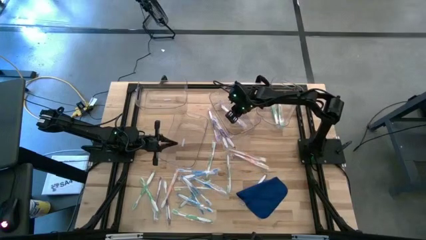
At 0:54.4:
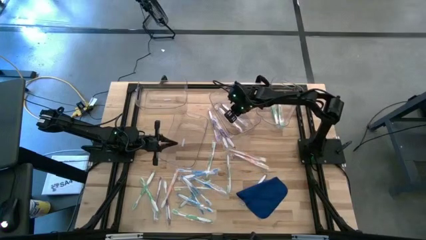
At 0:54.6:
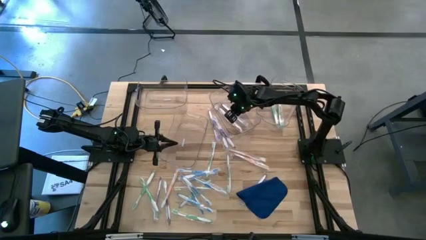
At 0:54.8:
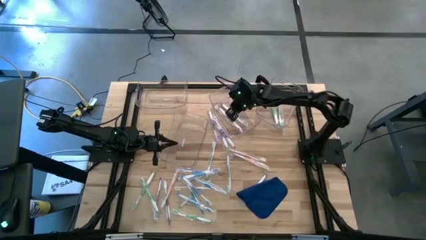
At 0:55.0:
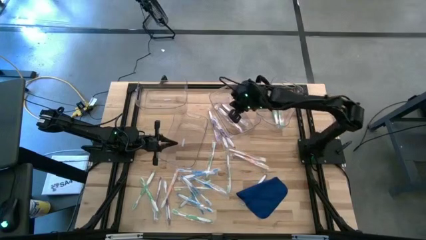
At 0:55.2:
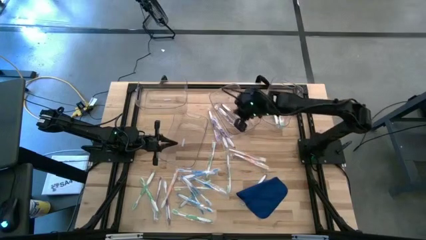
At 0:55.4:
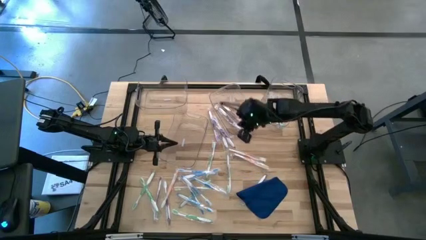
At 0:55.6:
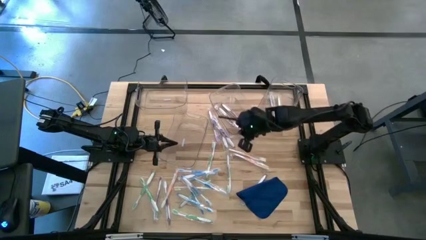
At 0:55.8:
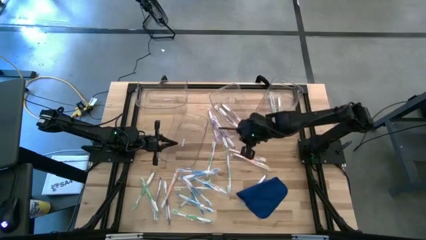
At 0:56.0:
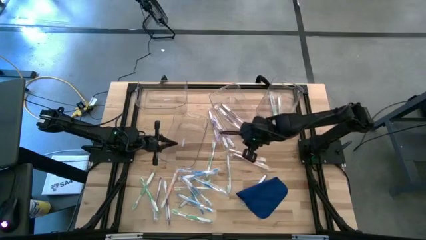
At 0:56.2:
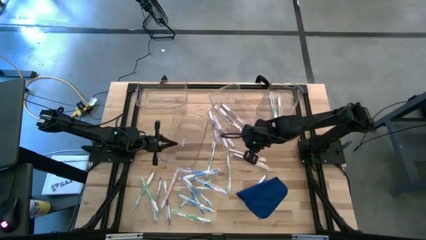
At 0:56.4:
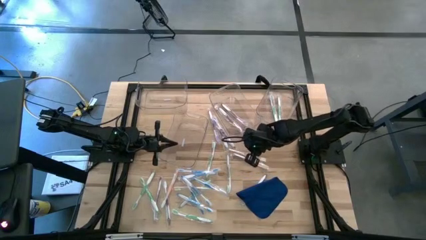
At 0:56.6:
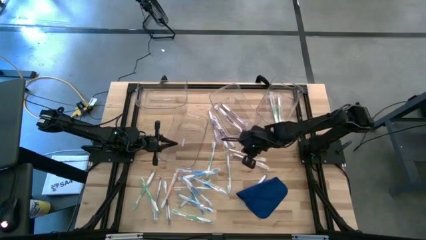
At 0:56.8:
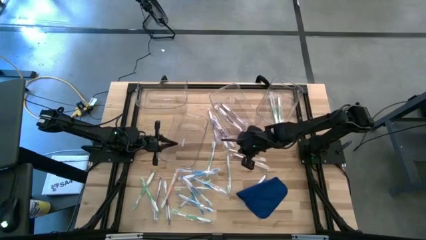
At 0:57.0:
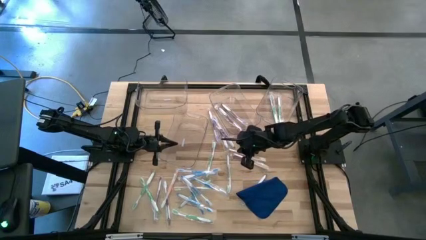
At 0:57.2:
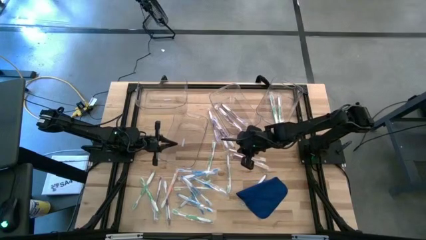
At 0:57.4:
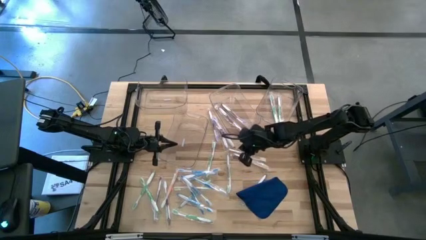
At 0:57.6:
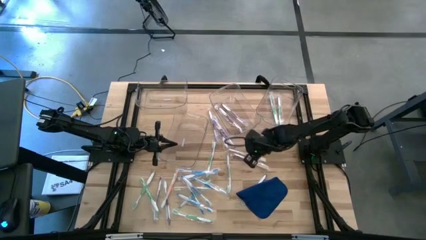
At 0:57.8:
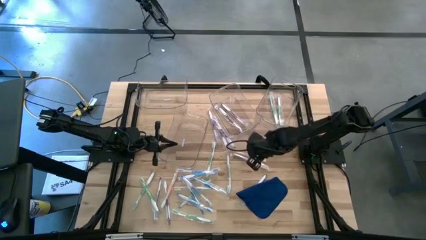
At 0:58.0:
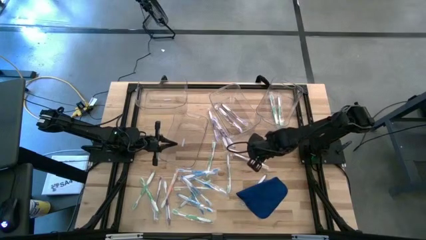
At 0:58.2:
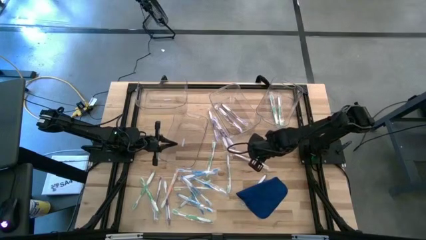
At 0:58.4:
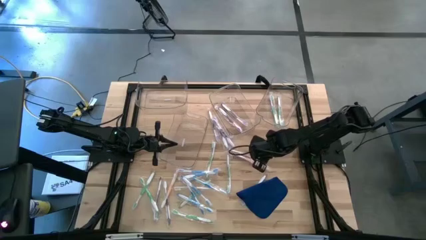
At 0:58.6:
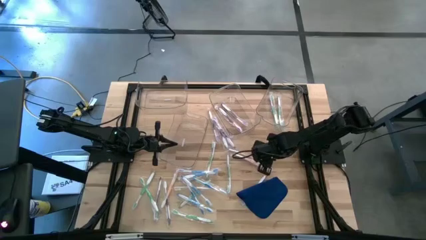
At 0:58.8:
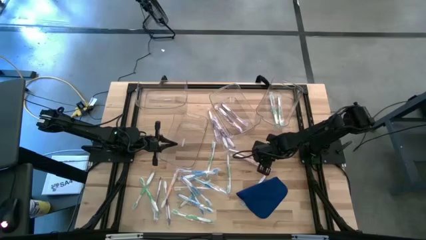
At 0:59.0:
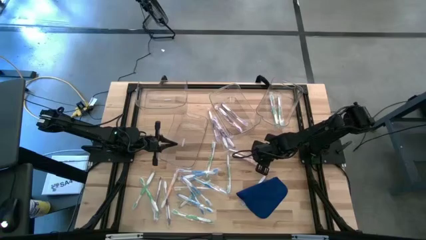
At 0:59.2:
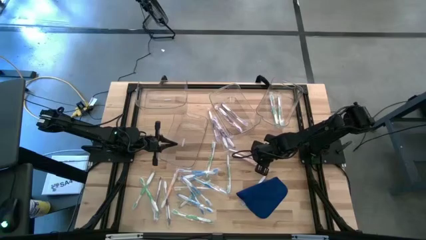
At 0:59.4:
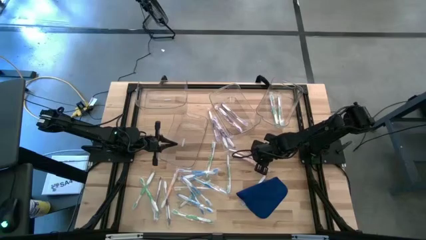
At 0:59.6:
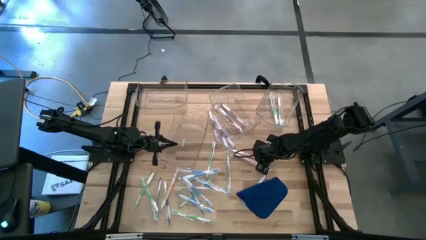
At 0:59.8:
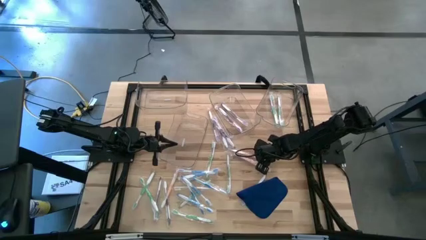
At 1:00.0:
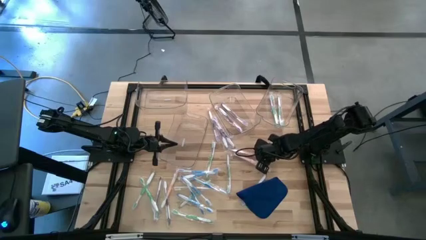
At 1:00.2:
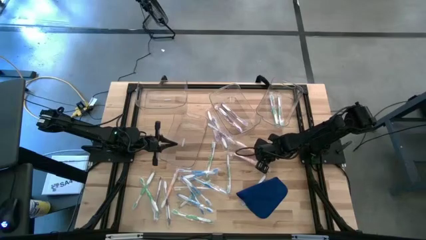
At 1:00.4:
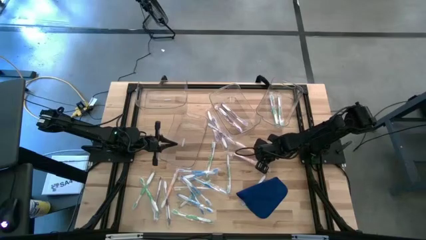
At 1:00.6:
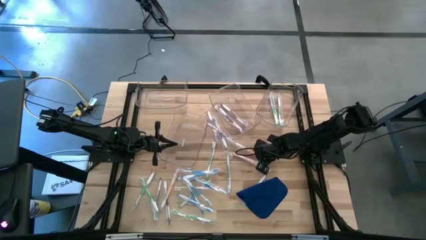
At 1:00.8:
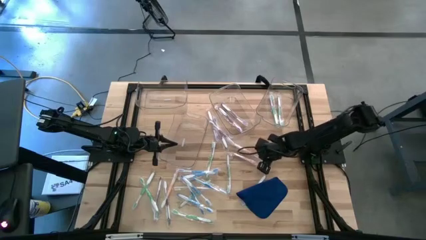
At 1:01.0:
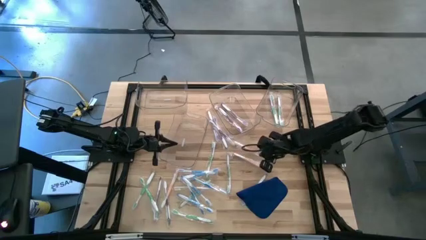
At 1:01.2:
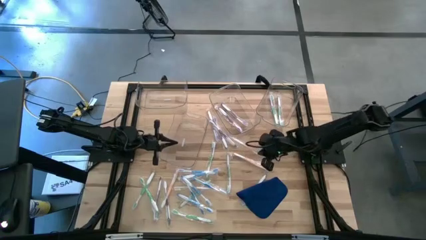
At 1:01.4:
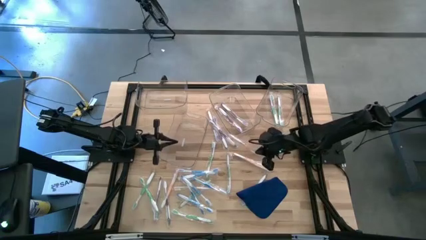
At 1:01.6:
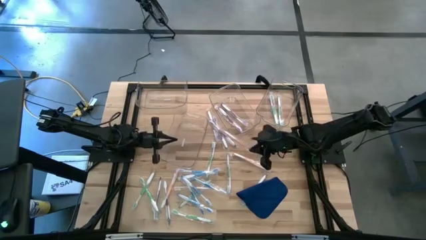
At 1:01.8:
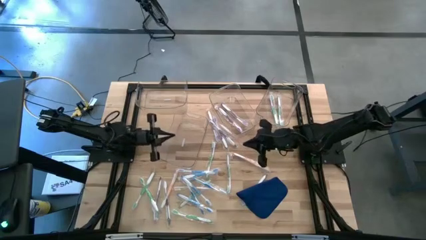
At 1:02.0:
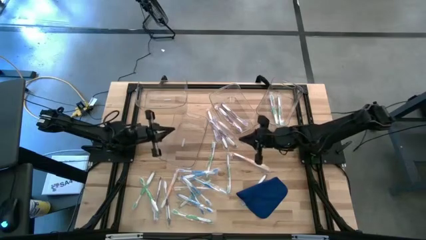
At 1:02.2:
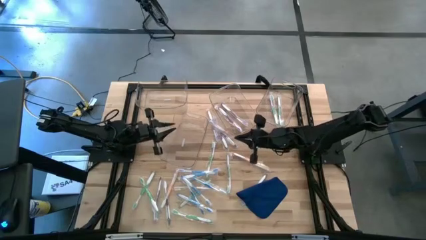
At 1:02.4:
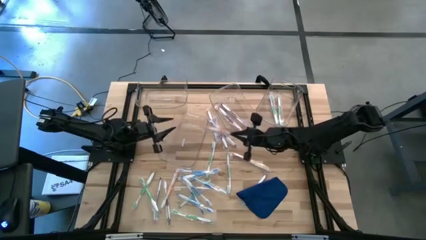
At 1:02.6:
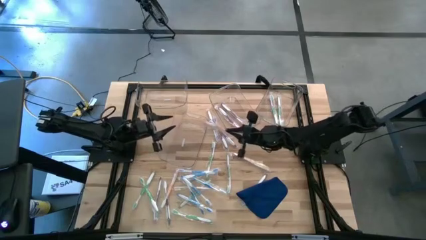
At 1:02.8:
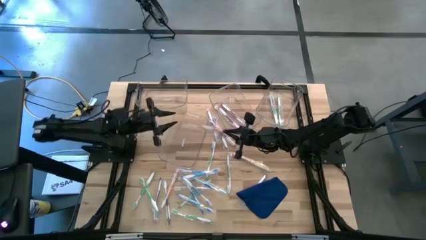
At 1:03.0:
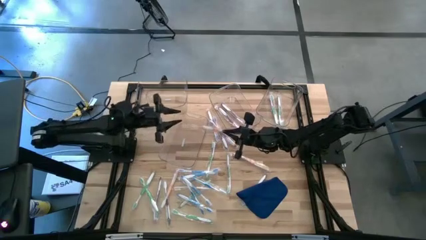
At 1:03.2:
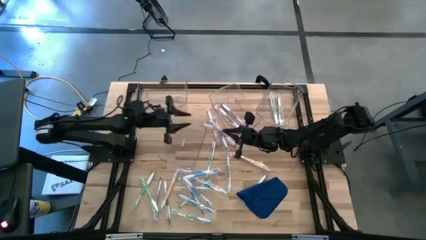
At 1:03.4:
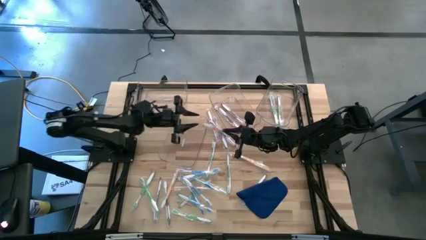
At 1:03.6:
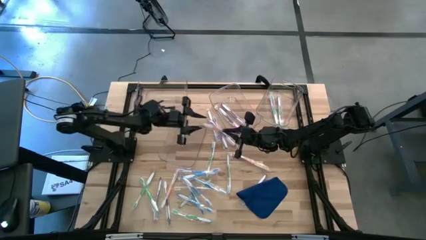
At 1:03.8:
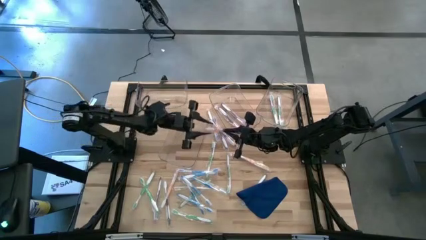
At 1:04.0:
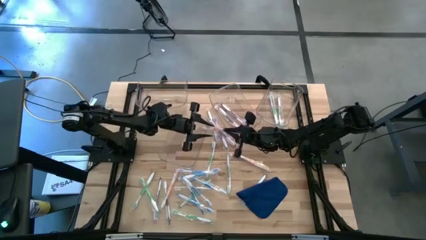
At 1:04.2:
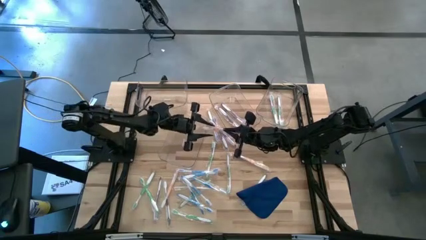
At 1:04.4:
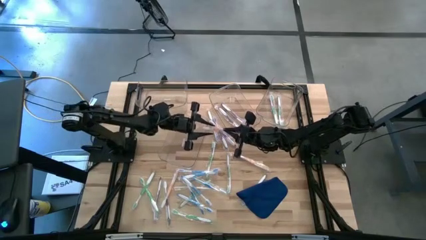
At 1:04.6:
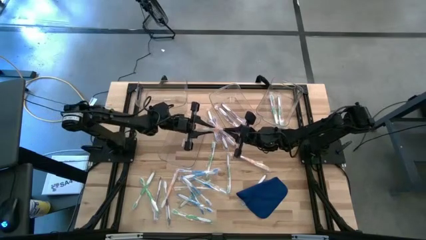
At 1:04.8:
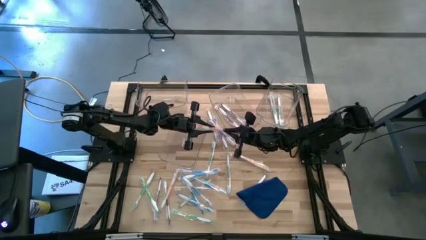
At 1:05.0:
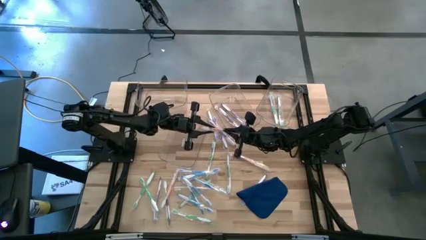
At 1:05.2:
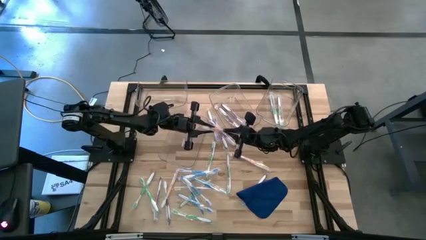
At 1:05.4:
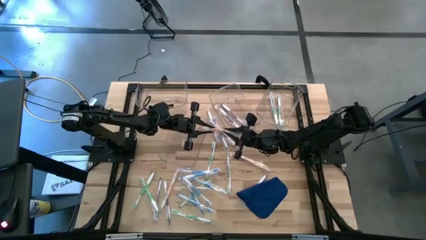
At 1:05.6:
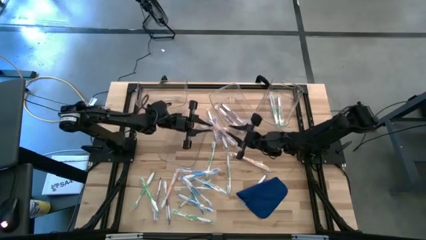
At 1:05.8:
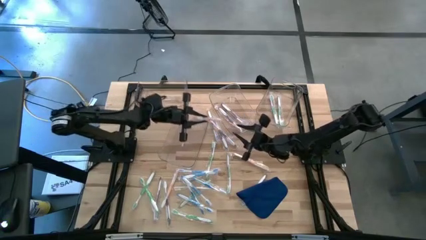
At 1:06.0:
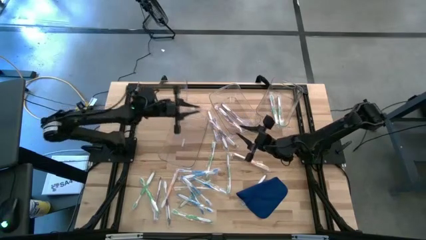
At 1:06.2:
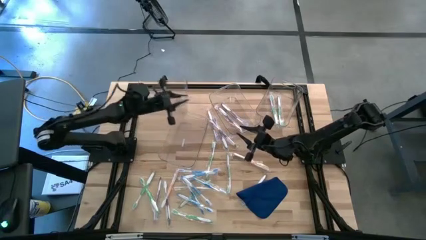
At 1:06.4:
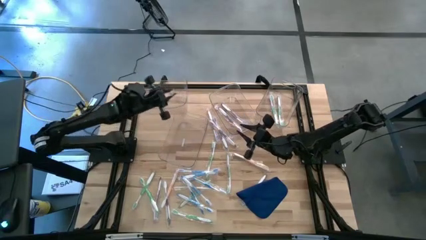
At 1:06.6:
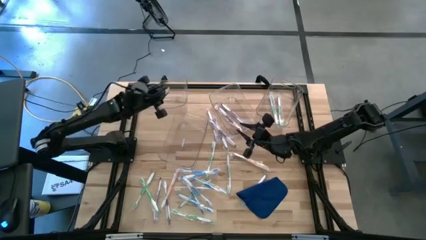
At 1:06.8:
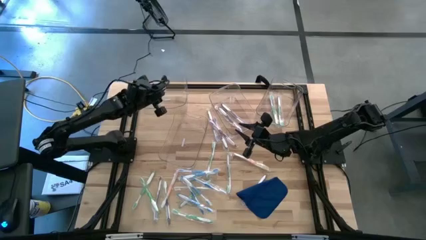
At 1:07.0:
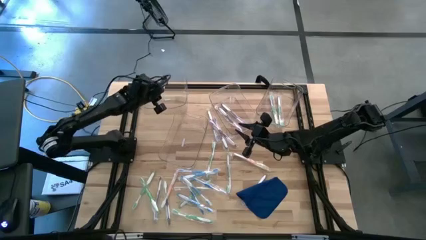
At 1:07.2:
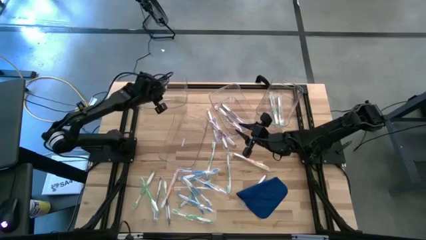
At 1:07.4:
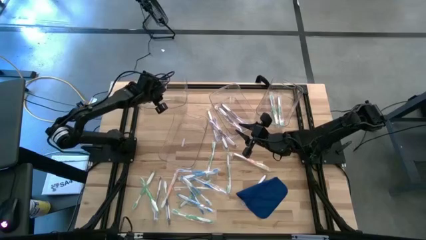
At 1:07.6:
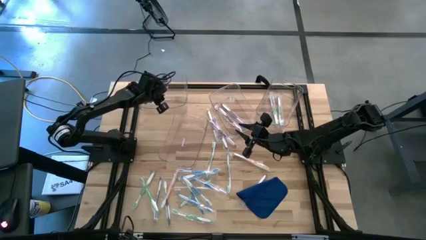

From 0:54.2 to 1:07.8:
Task: Pick & Place Toothbrushes
Put the orange toothbrush into the top left transparent bin
